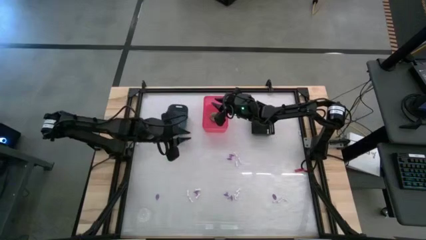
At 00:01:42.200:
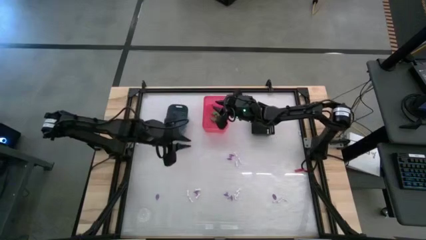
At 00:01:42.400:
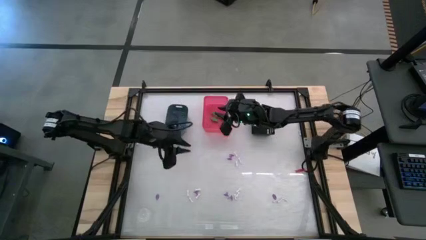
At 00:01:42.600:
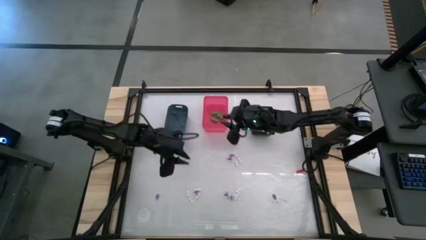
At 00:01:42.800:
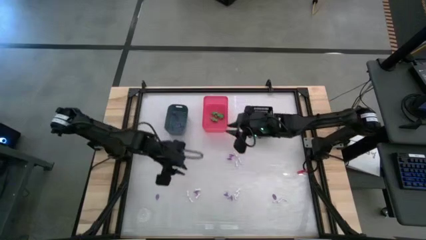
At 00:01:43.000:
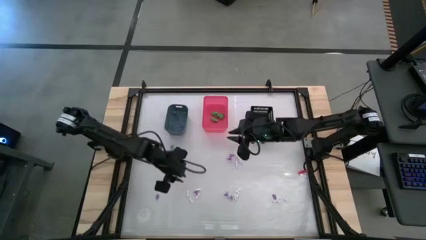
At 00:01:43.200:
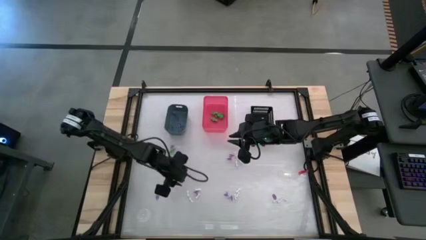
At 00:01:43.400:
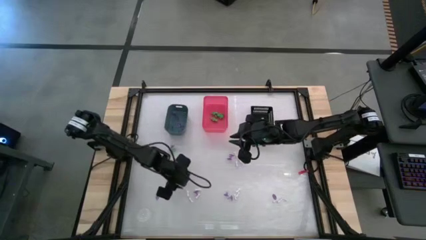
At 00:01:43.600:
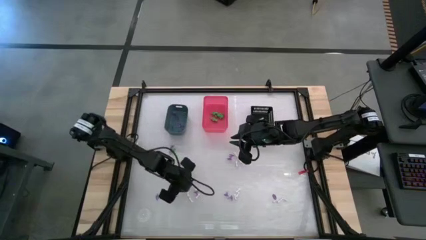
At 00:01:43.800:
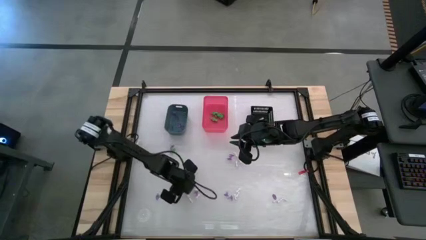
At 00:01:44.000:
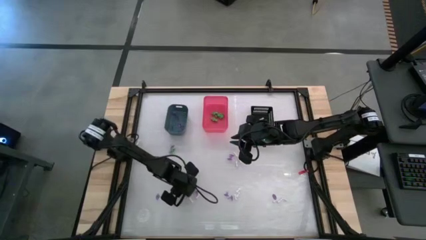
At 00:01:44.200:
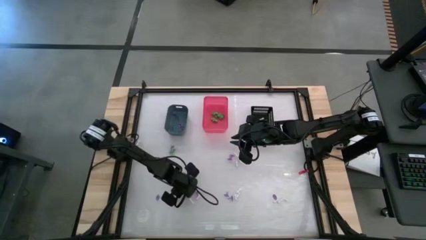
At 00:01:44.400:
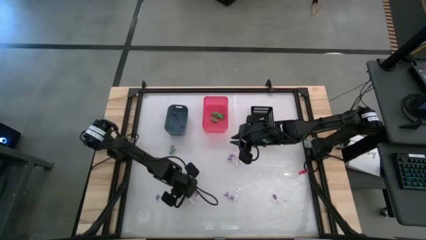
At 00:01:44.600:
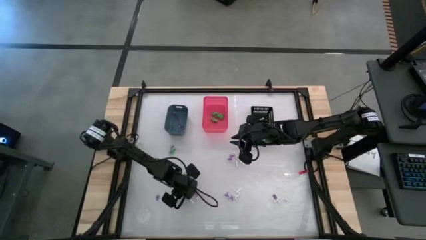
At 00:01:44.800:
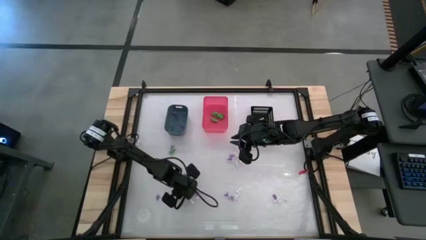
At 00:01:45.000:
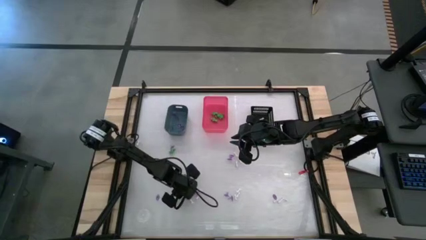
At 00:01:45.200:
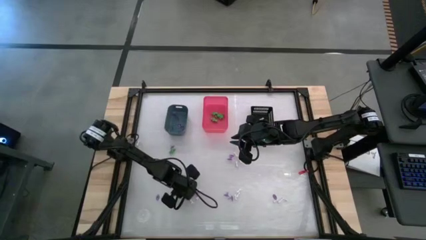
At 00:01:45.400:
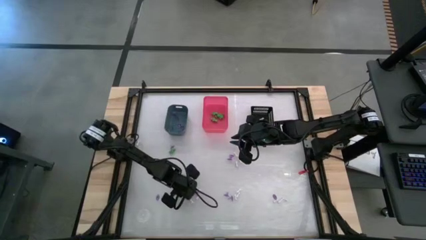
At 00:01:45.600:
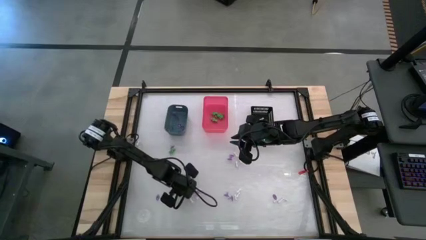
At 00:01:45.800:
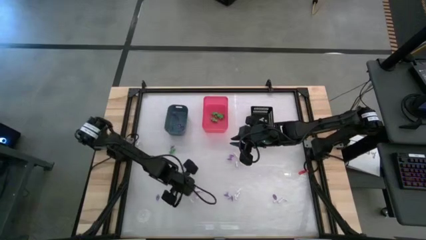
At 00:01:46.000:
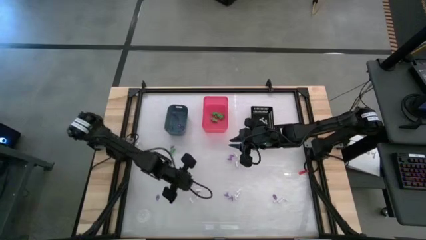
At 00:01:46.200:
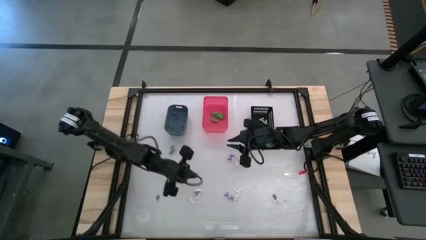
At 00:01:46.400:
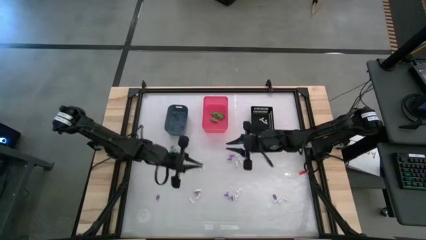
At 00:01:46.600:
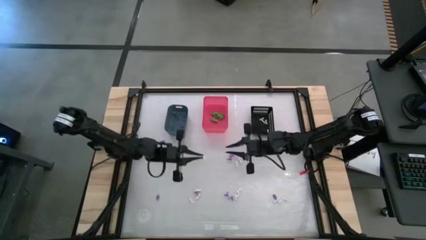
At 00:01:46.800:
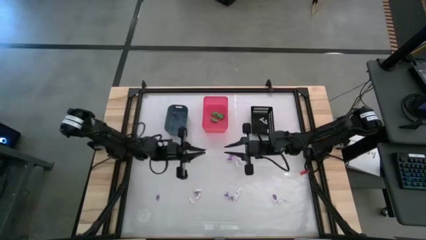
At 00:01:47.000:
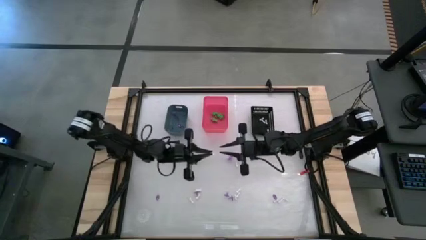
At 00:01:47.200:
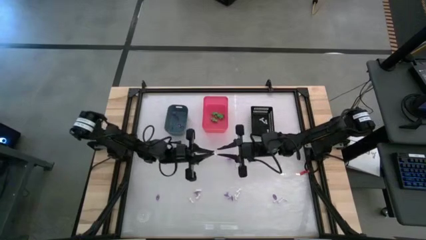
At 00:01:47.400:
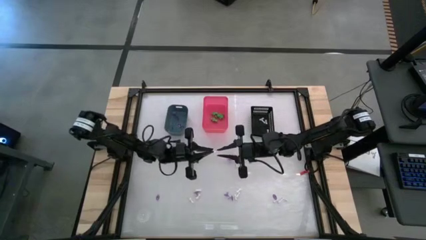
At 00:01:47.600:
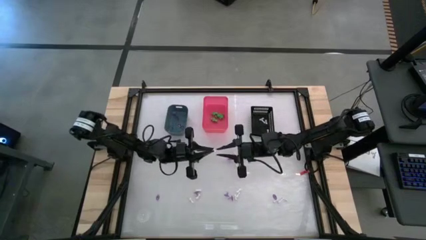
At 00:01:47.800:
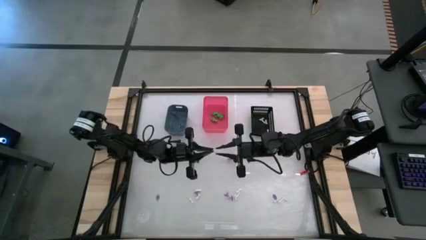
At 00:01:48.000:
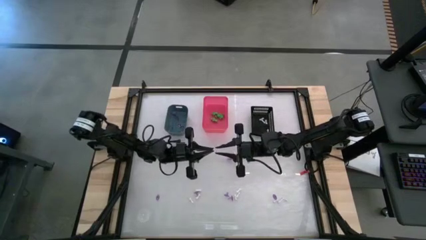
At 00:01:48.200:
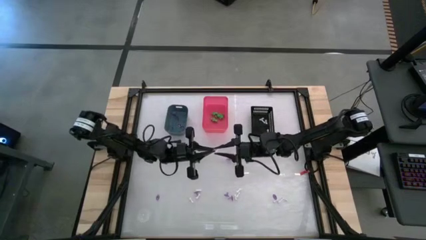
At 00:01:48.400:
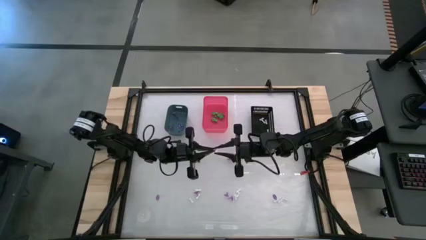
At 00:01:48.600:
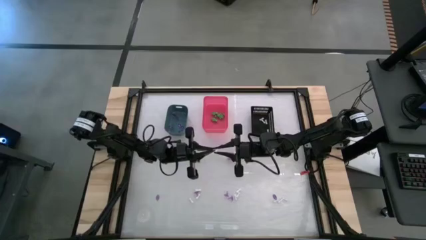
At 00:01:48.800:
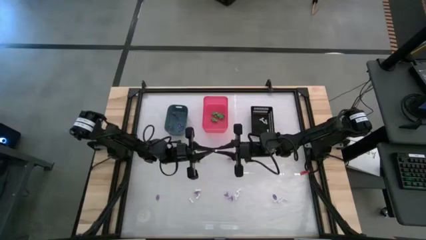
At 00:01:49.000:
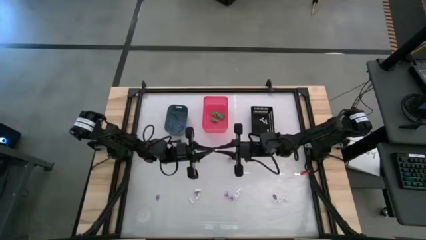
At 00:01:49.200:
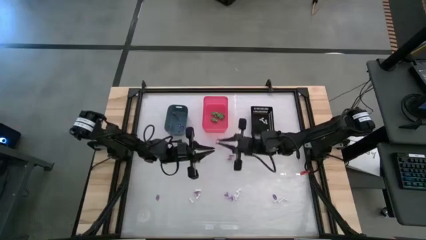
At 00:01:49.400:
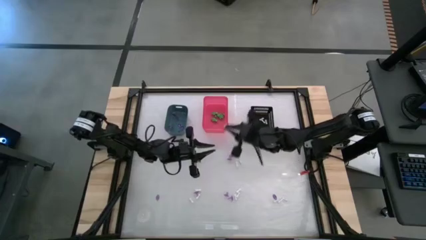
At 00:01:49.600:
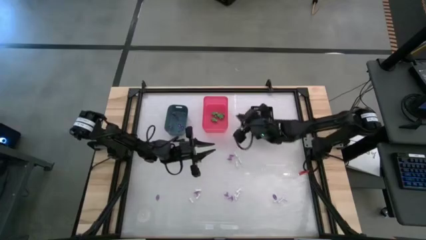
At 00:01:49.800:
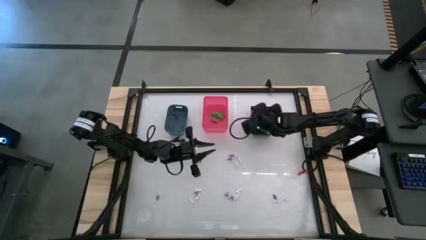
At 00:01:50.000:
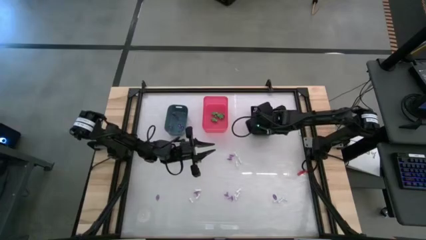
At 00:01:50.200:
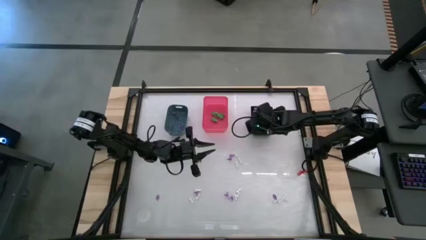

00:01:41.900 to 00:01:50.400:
Task: Sort Halloween decoration
Put the white bone toy into the black bin

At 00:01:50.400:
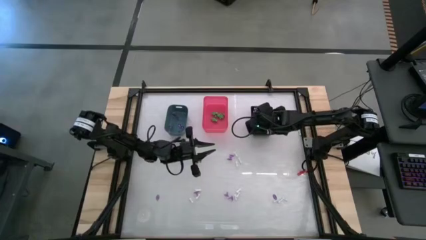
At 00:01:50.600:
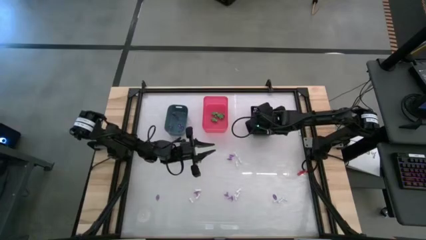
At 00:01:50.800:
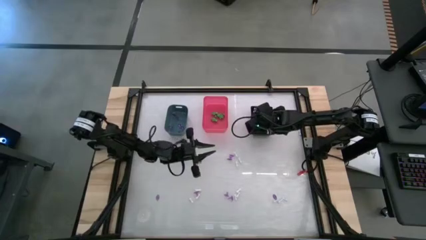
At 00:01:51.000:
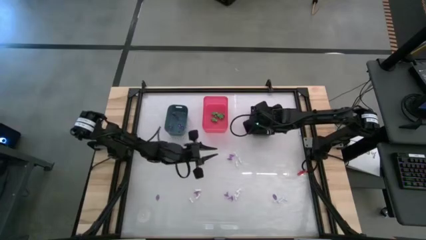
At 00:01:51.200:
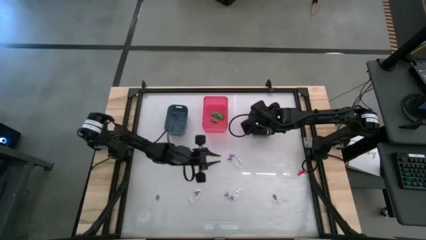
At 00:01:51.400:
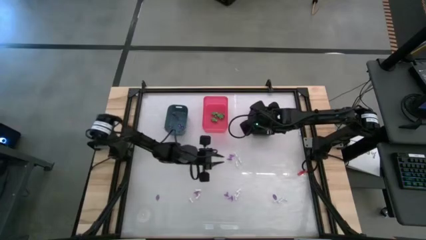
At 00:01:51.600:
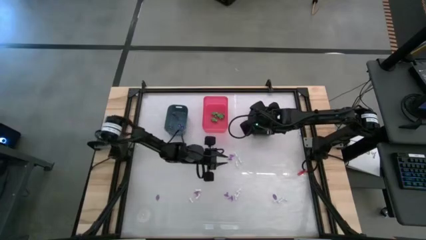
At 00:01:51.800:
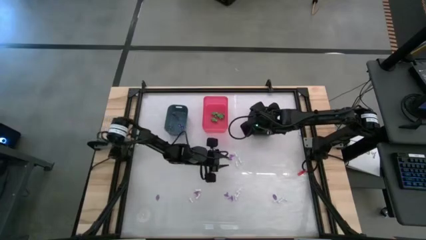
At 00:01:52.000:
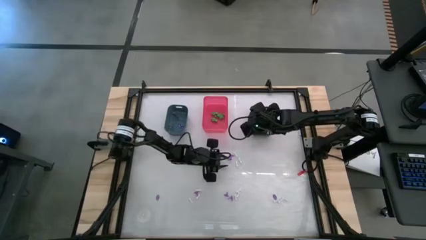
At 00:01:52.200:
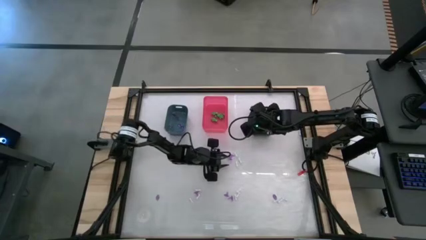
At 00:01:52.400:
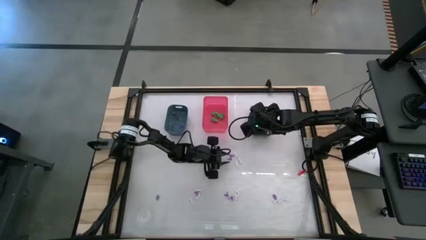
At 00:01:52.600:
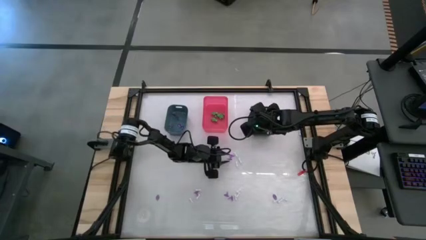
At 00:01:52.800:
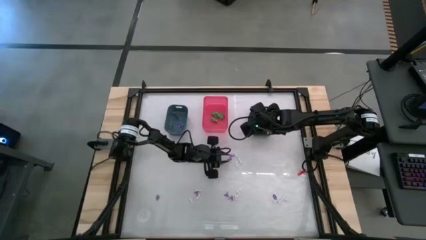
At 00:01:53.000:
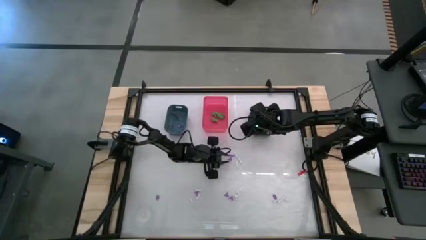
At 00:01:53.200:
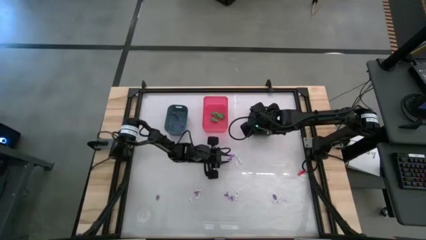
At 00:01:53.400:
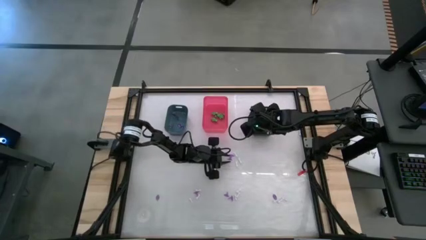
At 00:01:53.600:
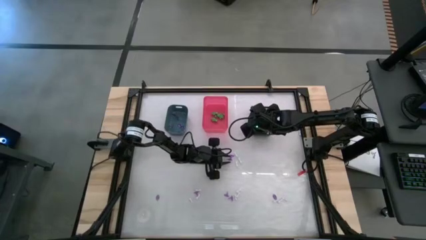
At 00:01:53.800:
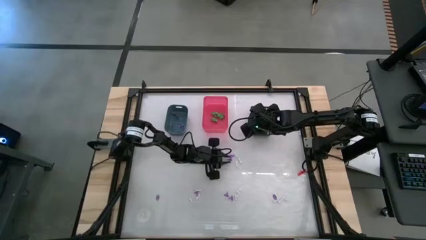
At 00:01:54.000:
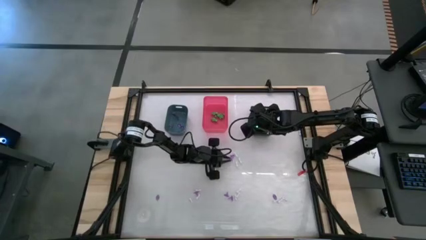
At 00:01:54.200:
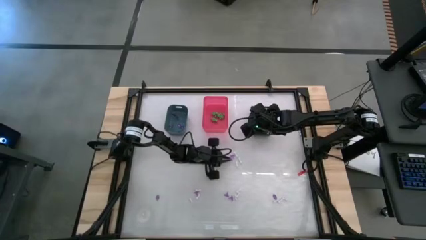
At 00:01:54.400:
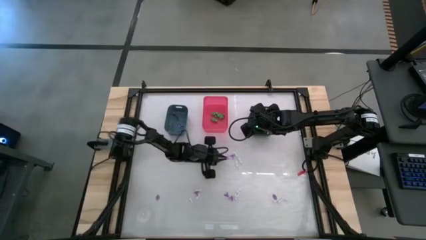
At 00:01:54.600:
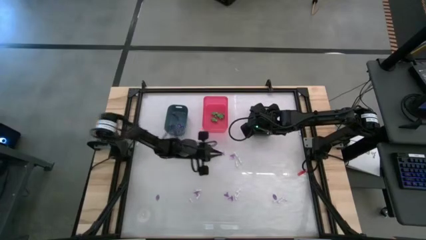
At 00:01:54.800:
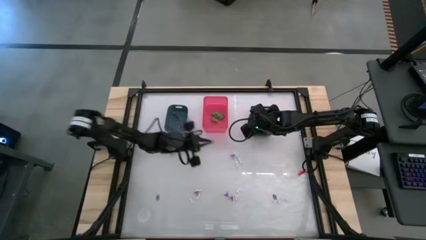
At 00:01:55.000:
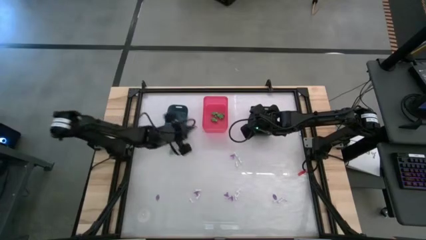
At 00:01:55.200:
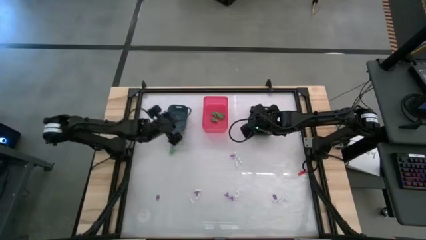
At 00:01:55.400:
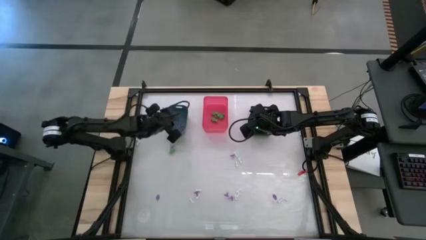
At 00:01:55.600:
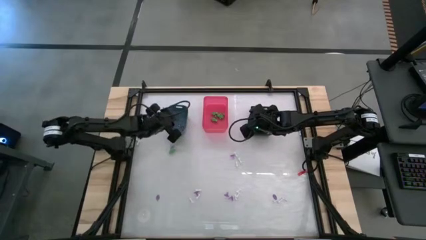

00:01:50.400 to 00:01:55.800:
Put the purple witch hat toy into the blue bin

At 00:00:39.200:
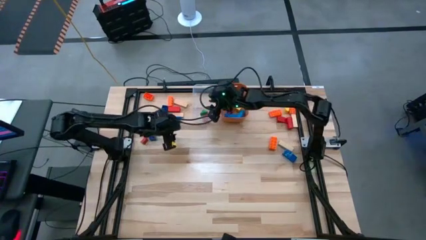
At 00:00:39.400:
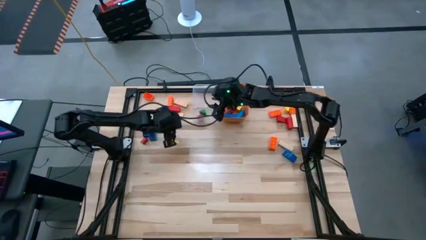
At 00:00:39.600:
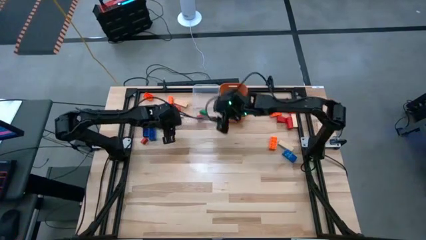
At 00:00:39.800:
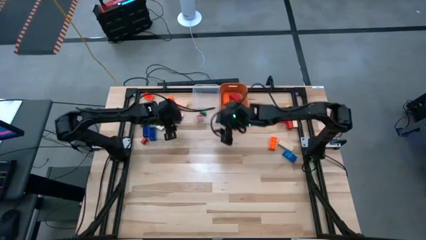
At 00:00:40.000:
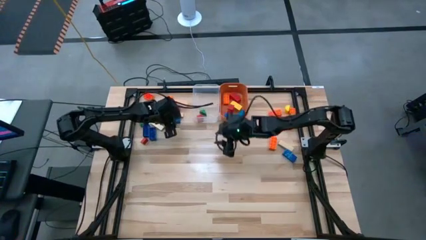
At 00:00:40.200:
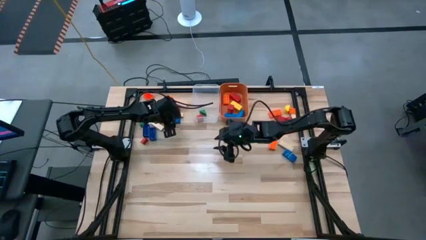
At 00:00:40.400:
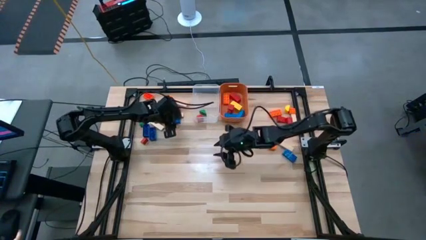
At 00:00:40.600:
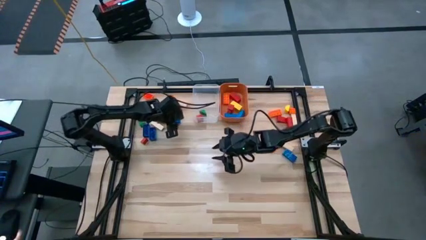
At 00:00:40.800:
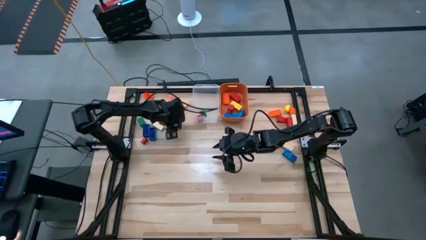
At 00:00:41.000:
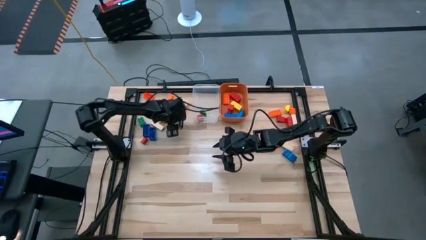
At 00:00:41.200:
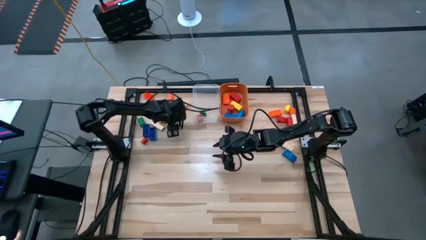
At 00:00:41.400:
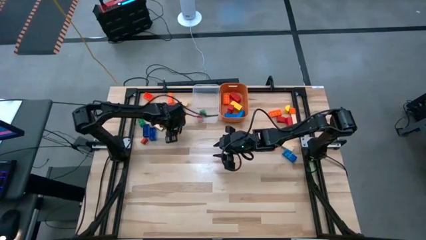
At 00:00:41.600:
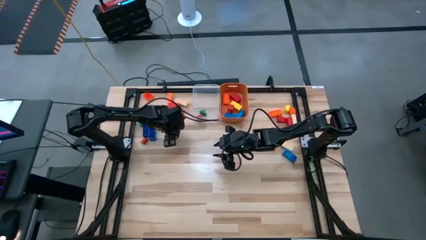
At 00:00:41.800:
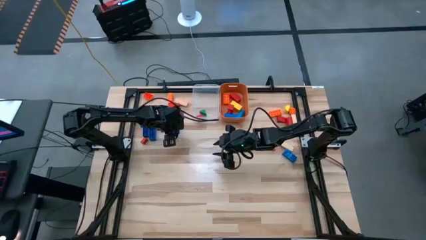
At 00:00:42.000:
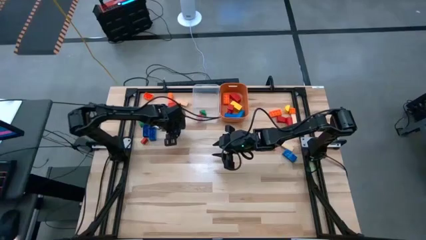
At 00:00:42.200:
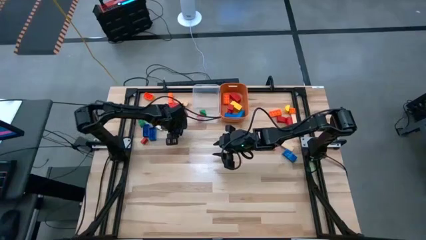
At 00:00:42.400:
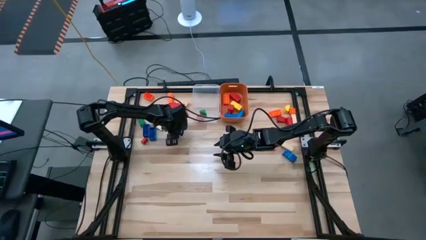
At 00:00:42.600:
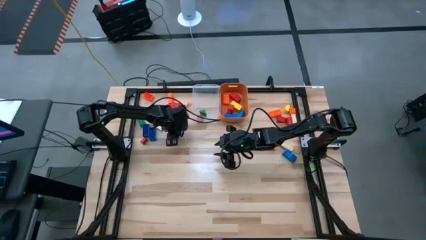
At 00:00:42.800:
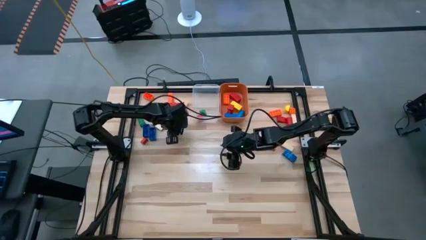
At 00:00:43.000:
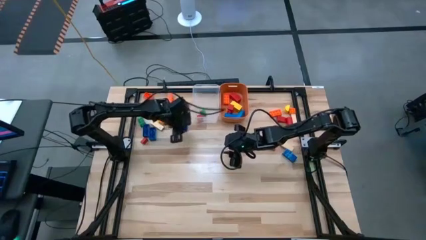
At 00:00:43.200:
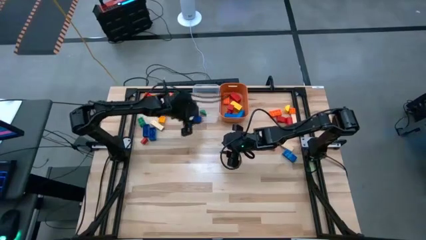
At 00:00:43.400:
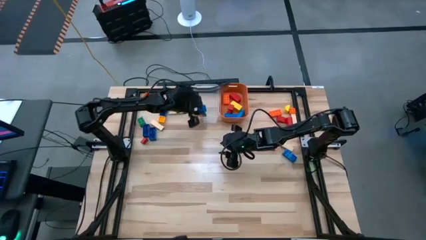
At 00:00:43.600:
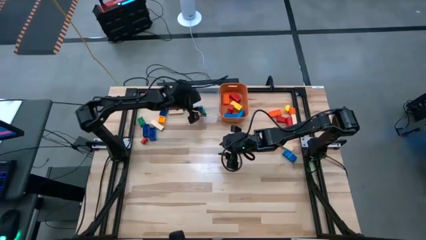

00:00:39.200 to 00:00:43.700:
Task: Sort blocks by size
Put the blue square game piece into the clear bin
